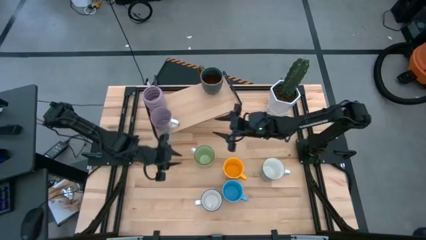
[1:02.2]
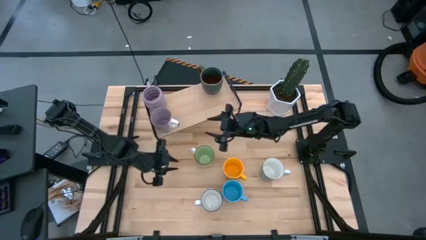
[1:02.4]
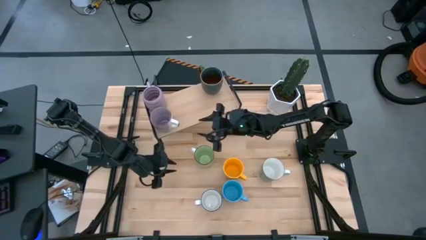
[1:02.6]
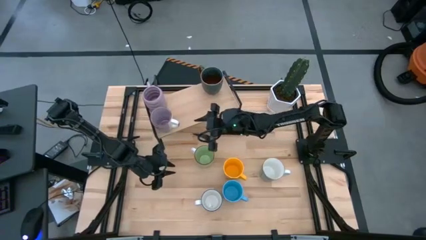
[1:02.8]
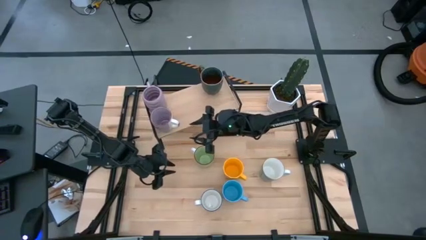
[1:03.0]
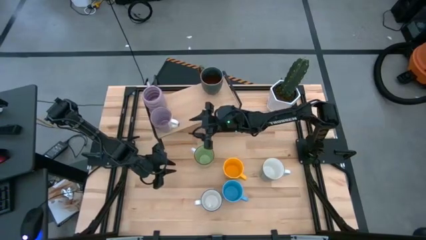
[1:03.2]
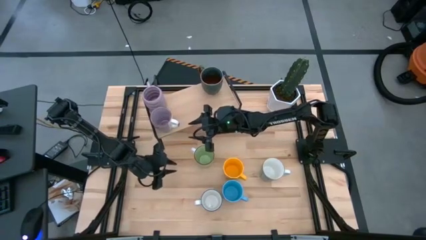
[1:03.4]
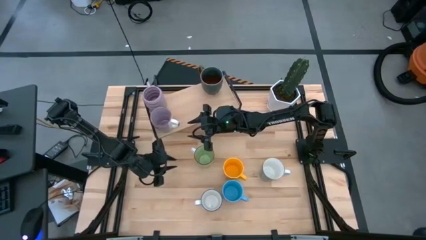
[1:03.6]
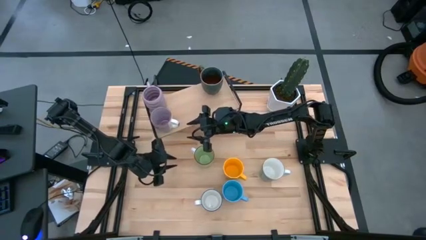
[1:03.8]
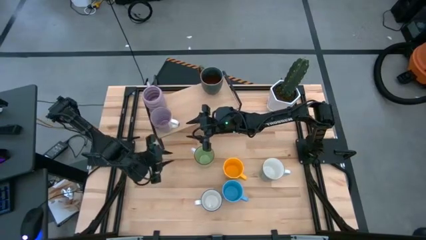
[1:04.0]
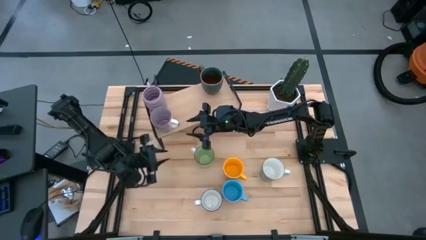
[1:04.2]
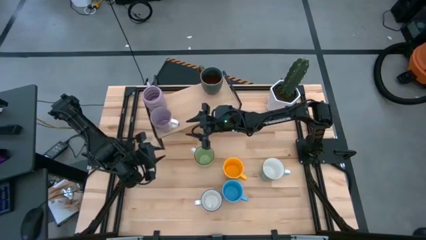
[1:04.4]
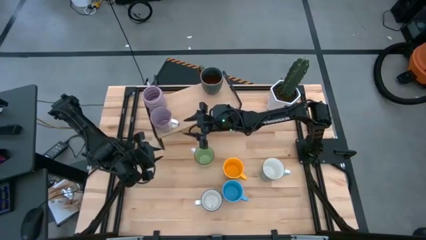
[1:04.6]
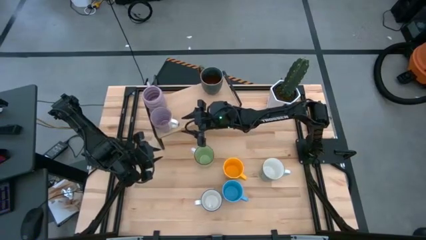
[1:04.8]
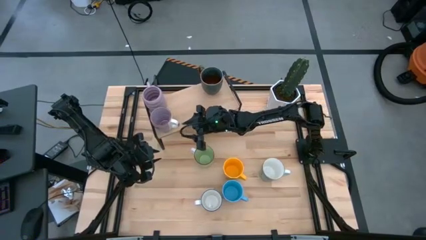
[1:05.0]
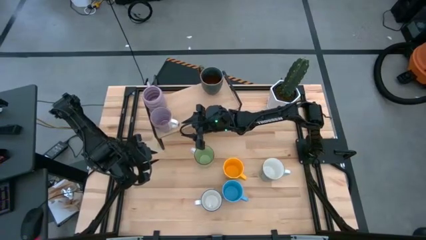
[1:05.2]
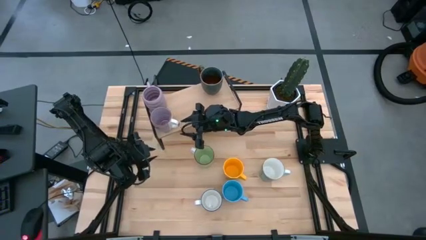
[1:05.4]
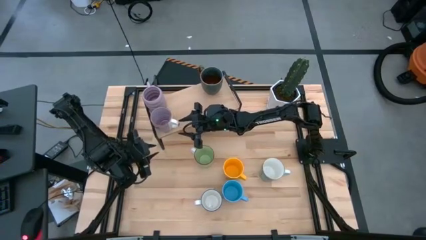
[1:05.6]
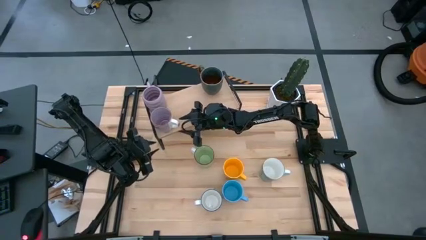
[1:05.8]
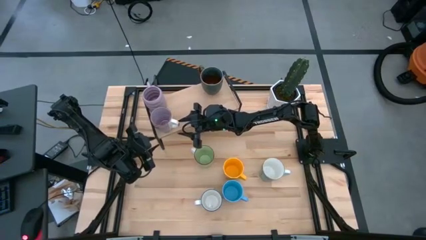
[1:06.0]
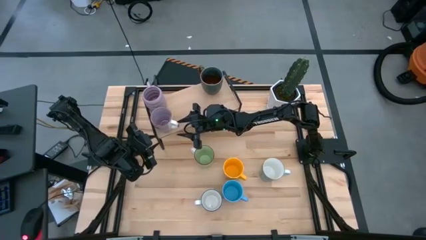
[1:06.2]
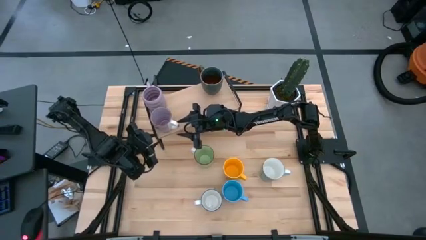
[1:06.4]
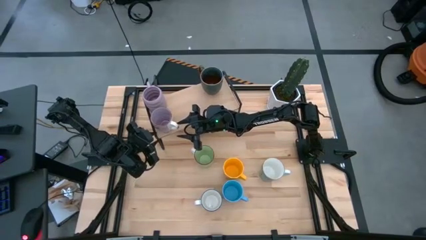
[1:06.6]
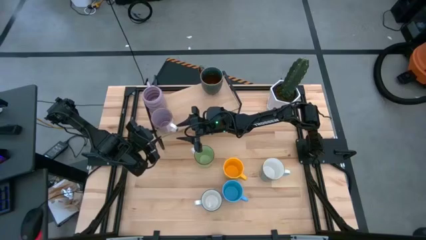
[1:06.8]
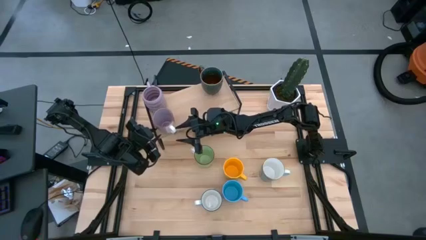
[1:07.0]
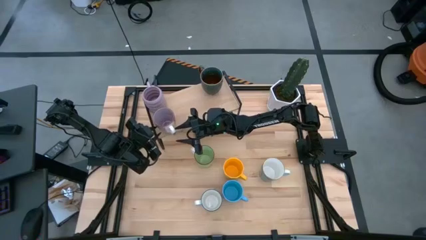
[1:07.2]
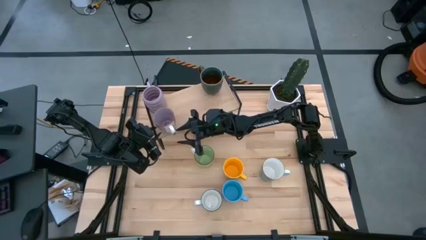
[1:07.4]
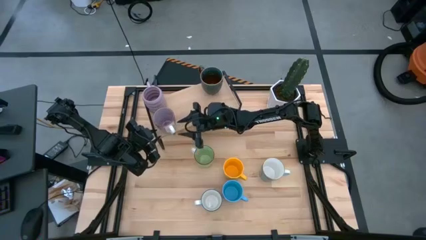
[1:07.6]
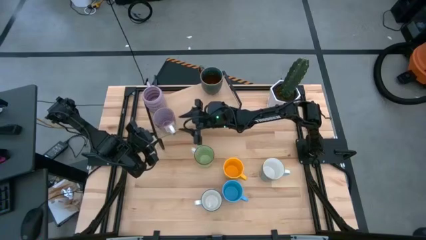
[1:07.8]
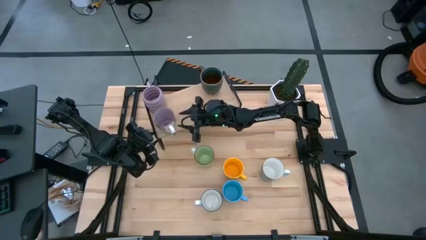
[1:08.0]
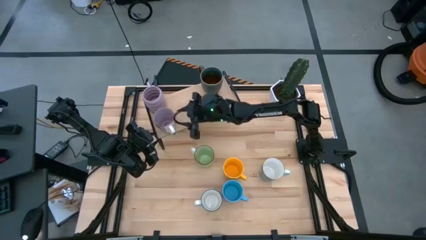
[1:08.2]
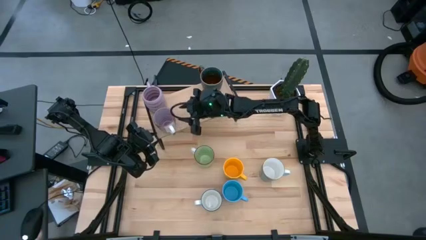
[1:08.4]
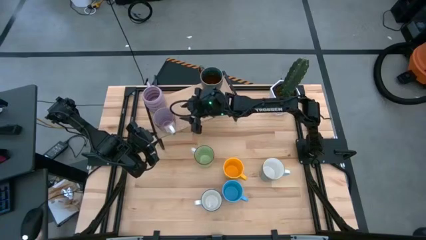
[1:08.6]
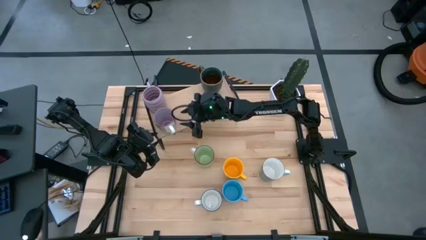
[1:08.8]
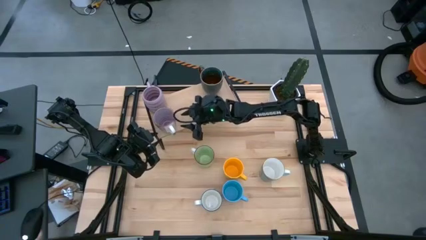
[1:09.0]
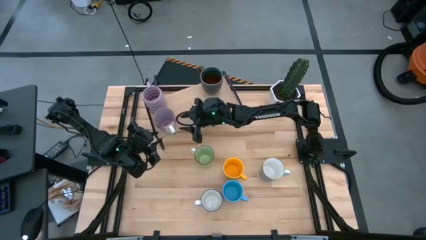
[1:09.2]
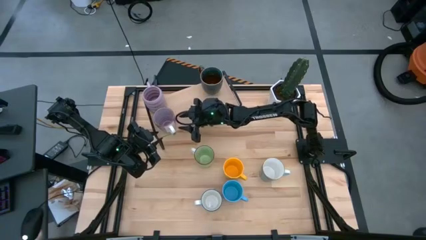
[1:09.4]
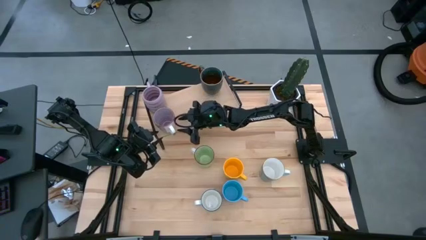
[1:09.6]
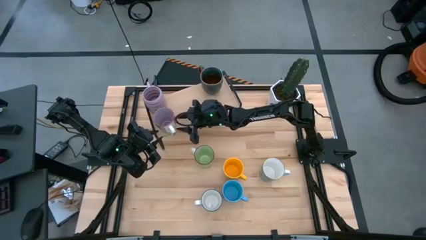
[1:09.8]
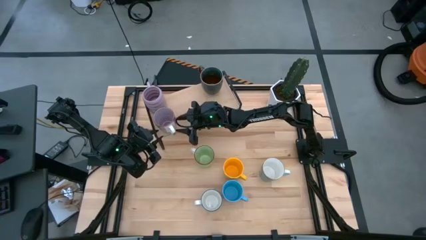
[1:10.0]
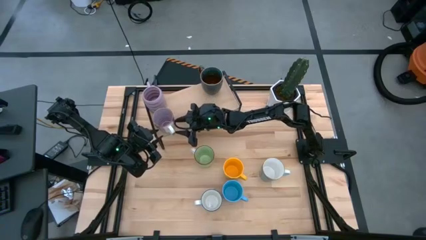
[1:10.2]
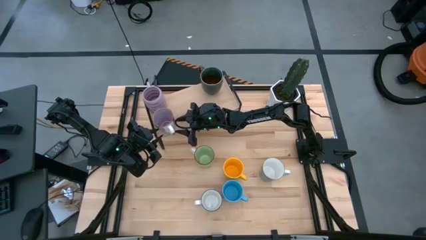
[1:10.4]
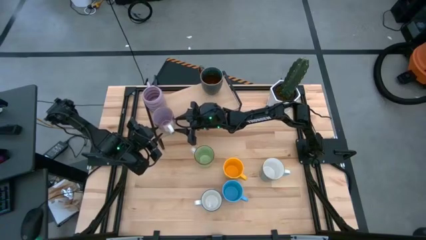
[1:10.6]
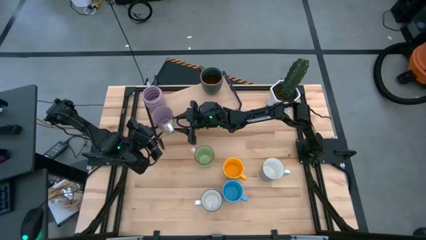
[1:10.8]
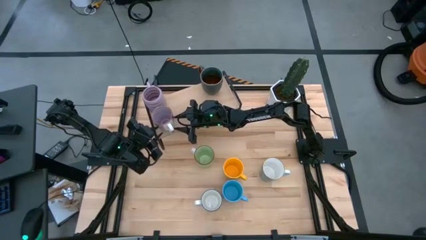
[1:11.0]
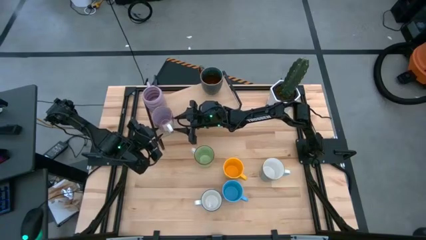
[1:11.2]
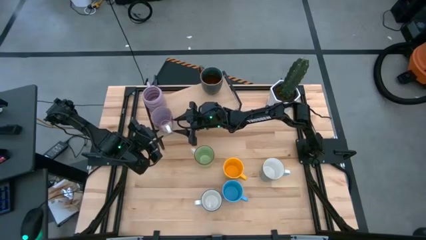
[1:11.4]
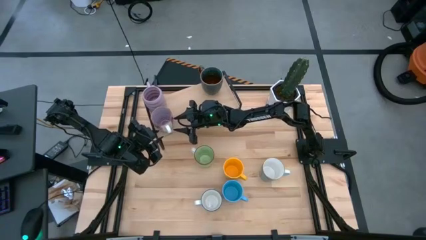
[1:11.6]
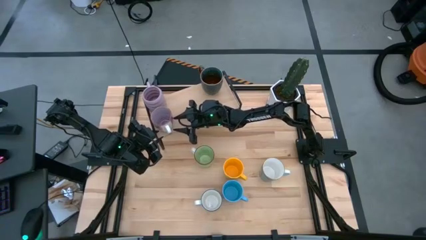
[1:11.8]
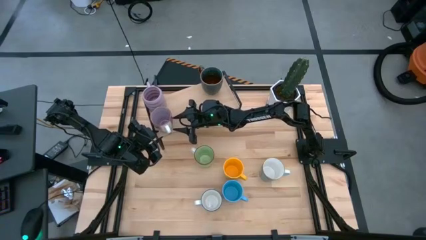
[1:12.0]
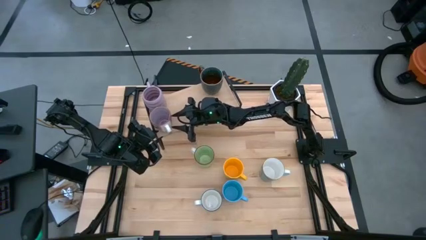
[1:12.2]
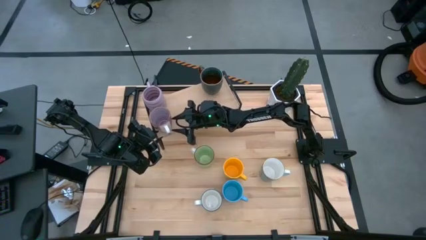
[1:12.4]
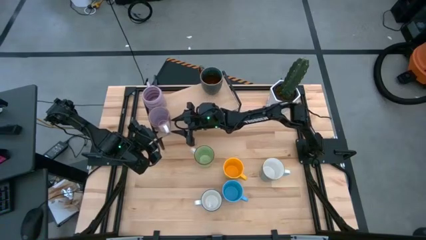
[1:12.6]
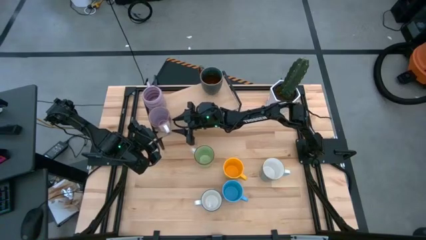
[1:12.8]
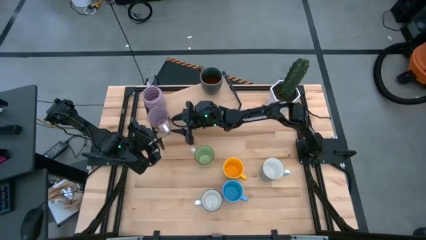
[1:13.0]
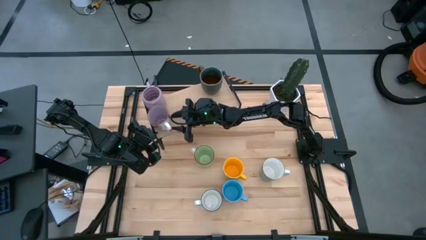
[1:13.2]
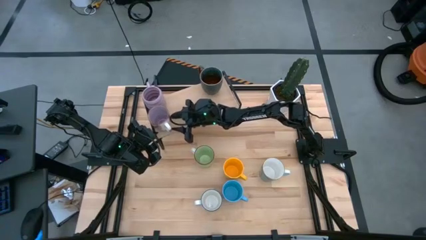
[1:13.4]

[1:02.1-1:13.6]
Task: Place coffee mugs
Put the purple mug on the shelf aligned with the other purple mug
